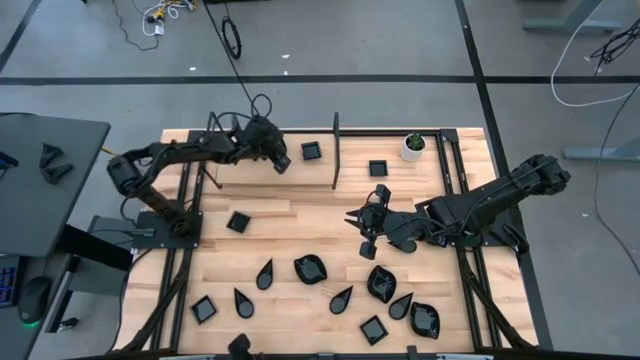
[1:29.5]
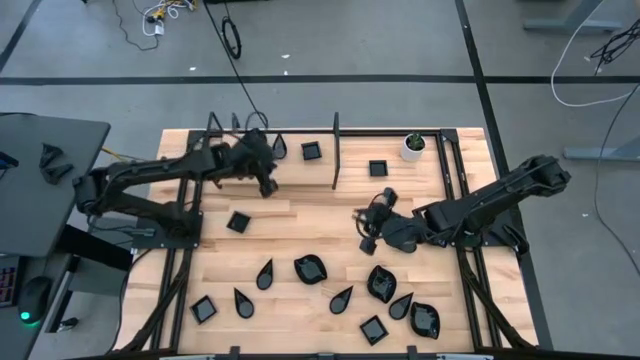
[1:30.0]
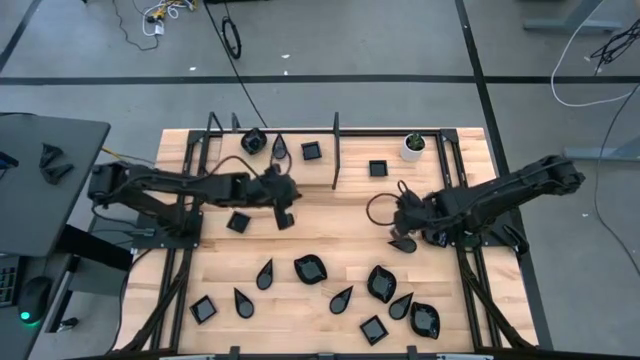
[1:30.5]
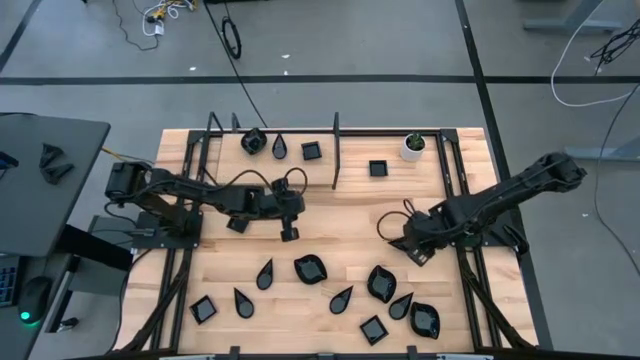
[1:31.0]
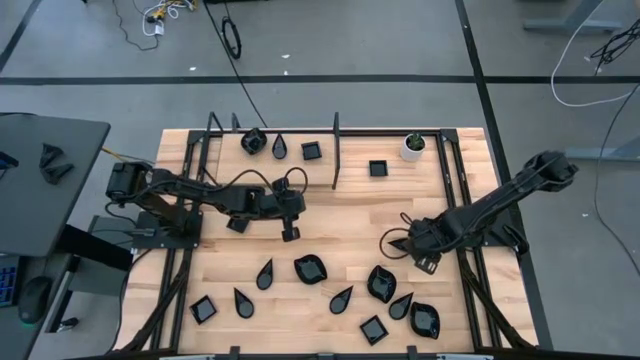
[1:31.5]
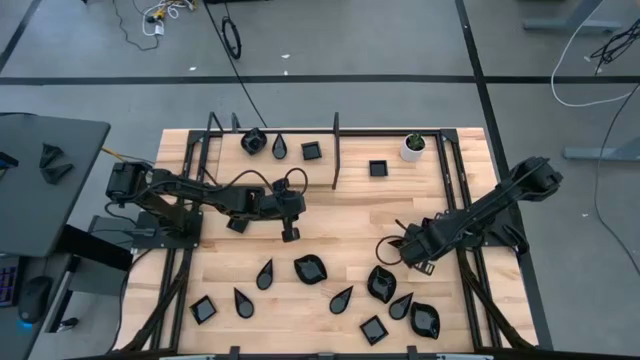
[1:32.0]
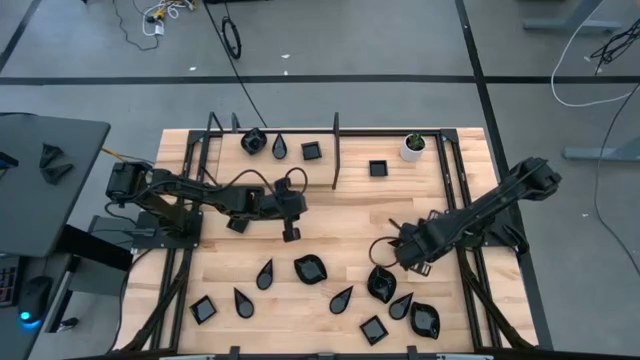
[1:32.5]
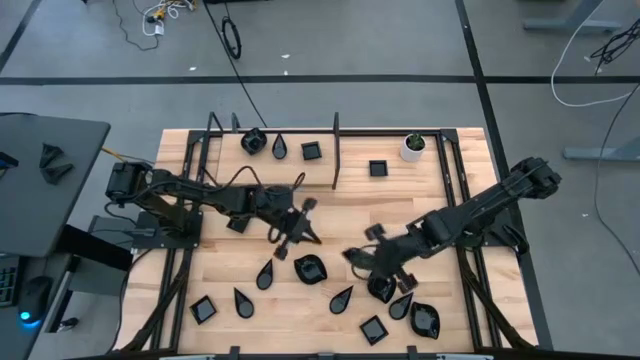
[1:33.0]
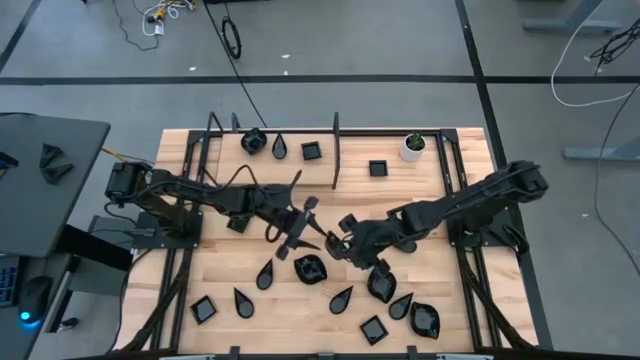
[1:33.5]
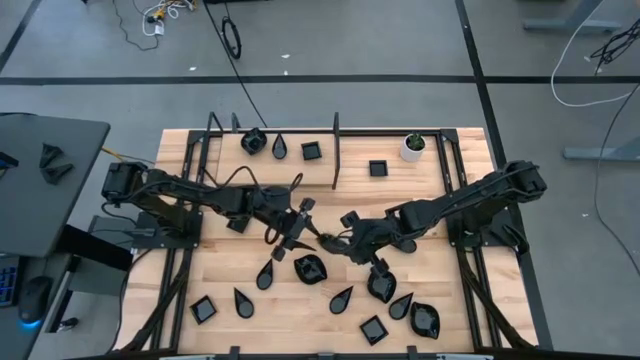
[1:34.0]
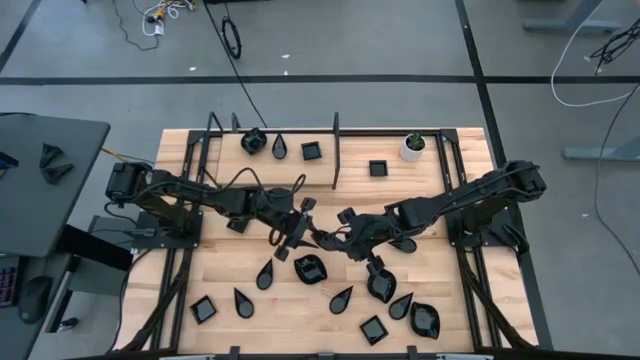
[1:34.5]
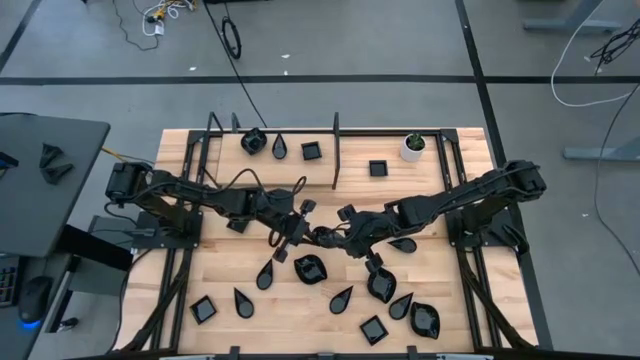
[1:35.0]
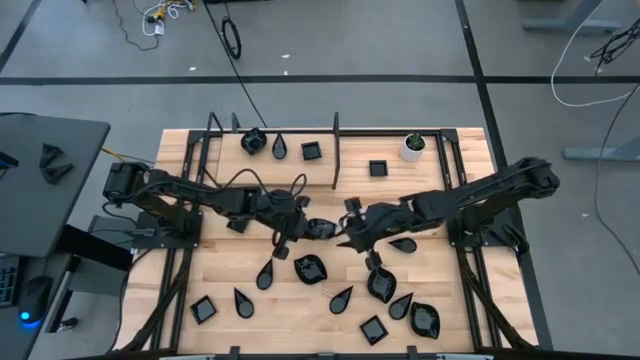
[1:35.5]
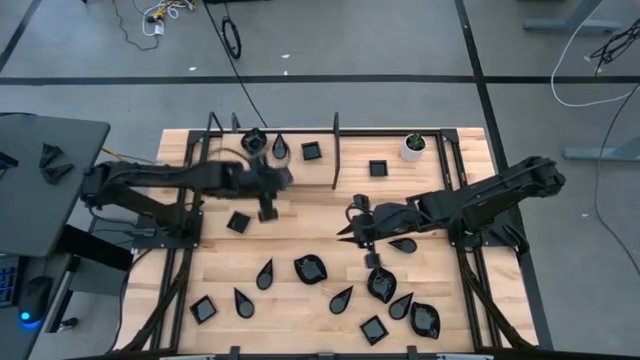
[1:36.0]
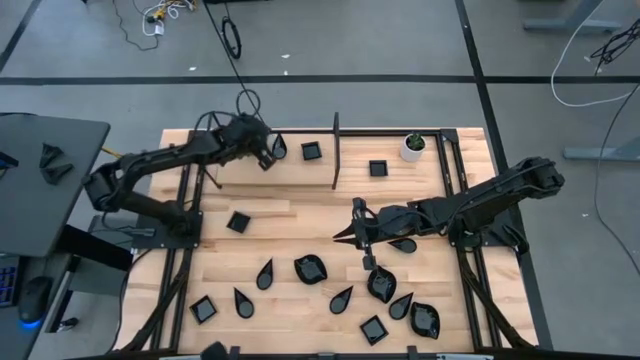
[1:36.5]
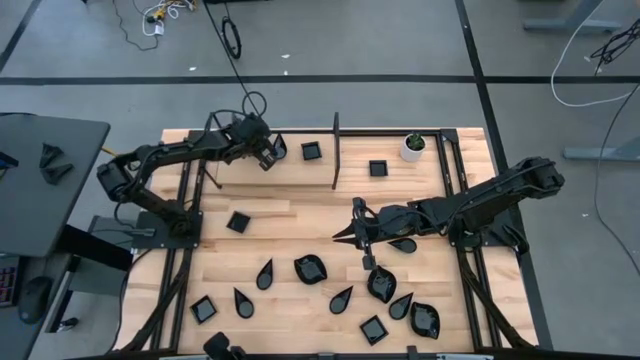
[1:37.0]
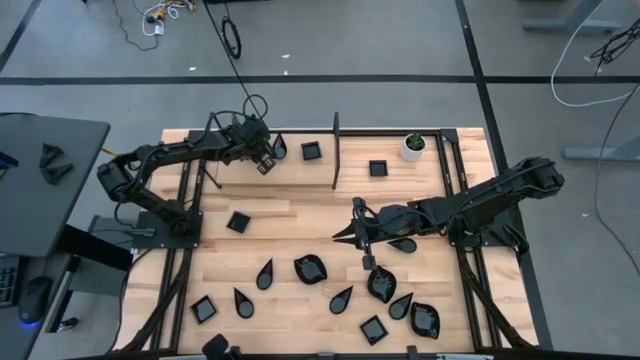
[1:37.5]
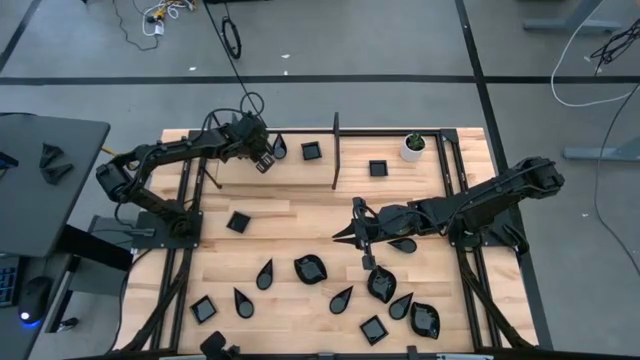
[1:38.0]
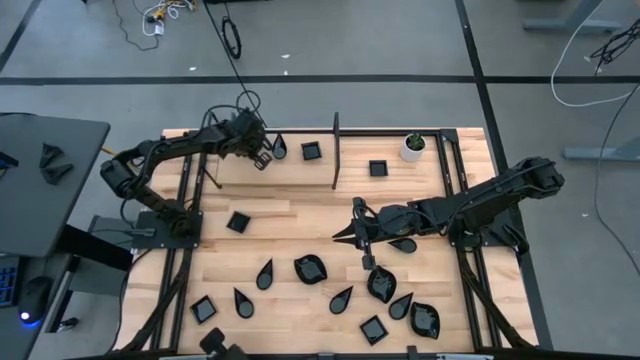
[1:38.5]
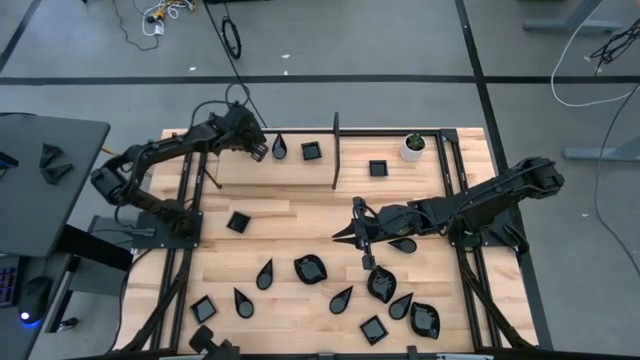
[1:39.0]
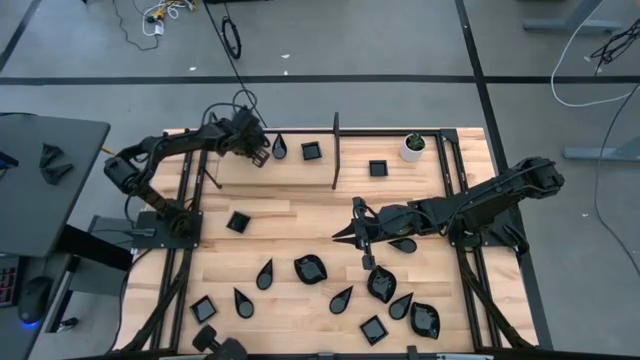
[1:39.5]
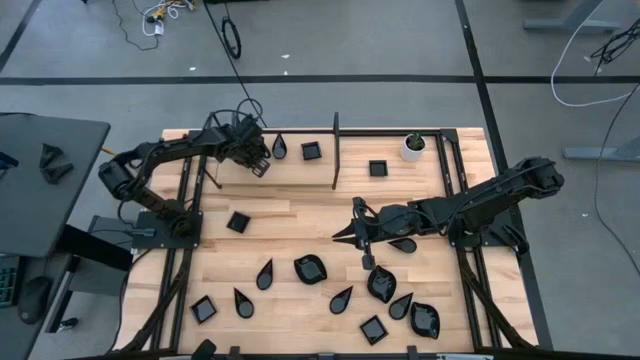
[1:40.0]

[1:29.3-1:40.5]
Task: Pick & Place Mini shaped plates
Stack the black leaf-shaped plate on top of the stacked black leaf-shaped plates on the shelf

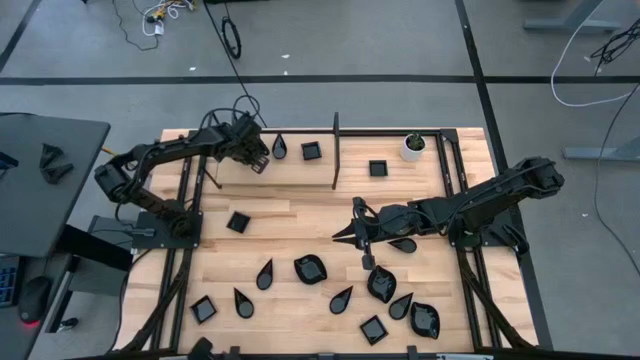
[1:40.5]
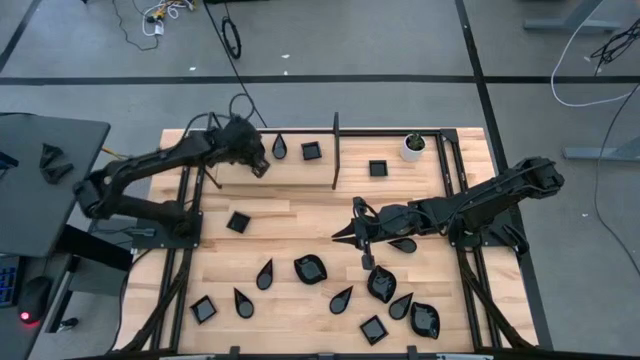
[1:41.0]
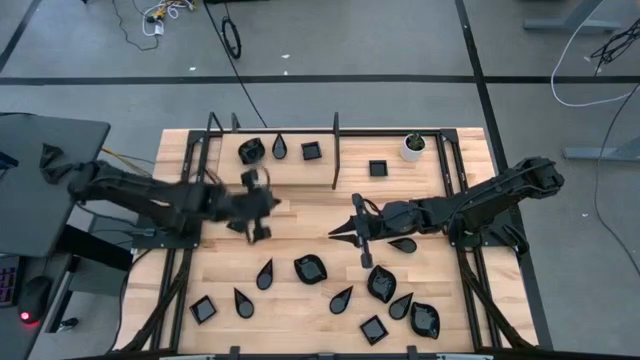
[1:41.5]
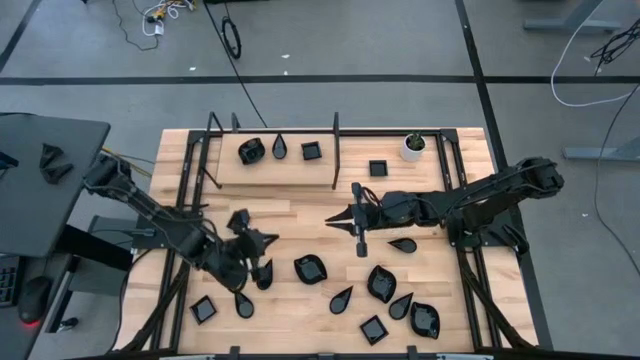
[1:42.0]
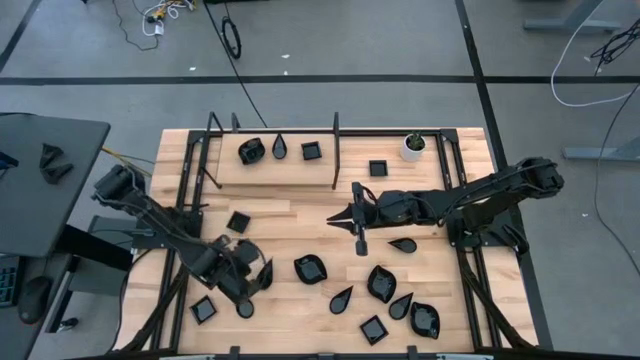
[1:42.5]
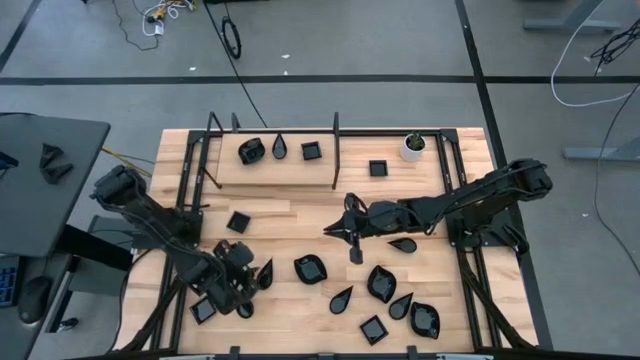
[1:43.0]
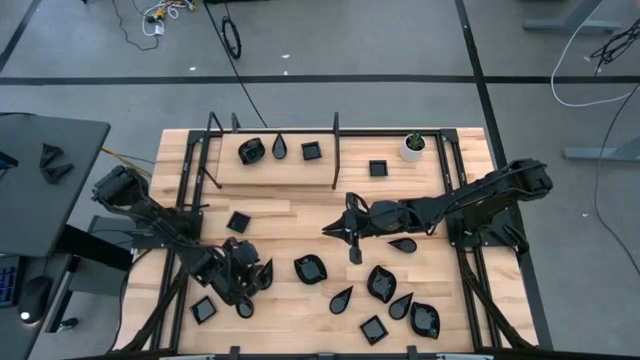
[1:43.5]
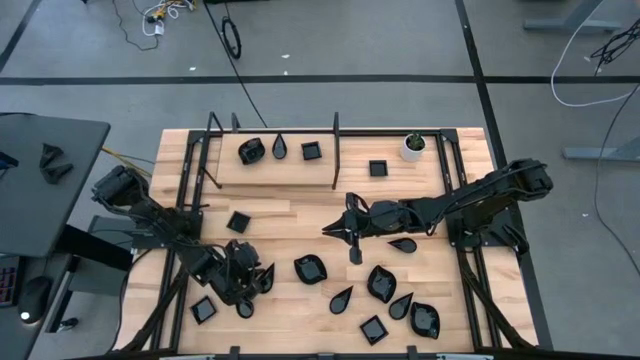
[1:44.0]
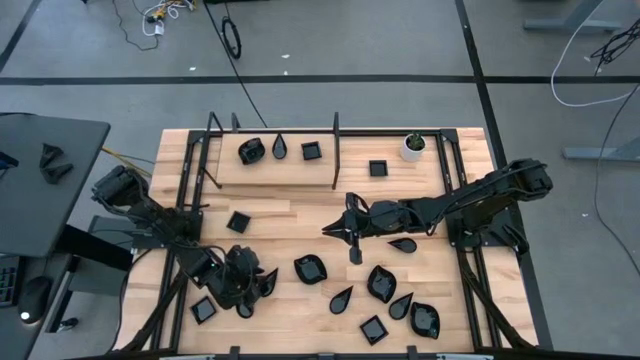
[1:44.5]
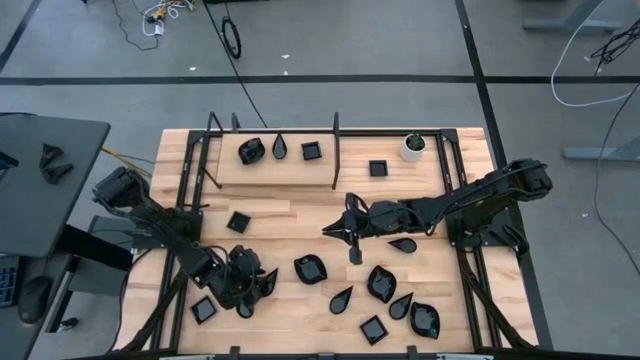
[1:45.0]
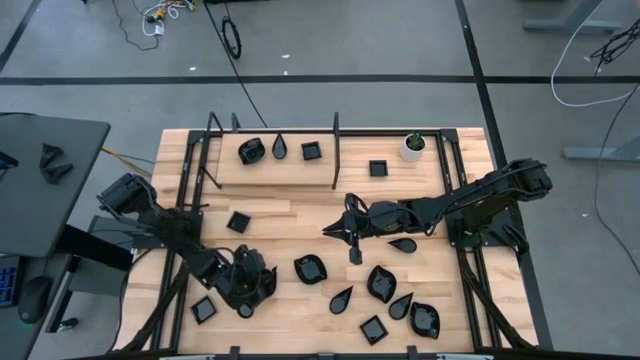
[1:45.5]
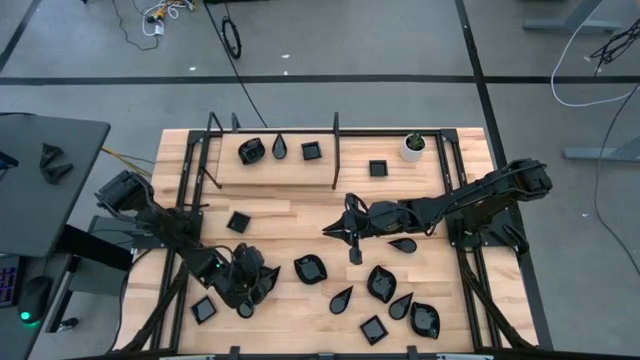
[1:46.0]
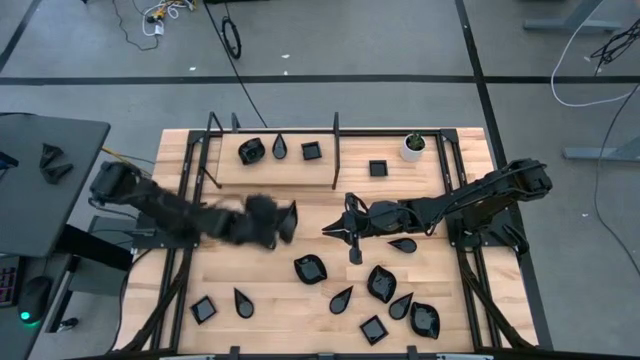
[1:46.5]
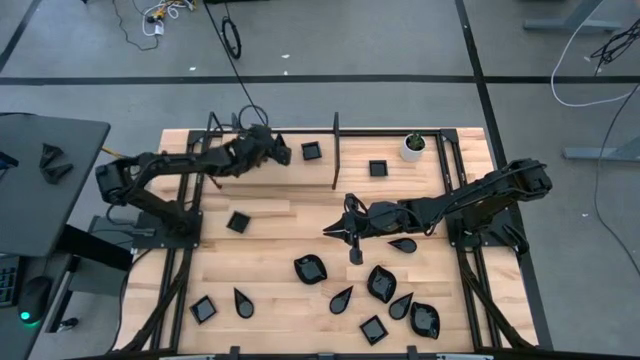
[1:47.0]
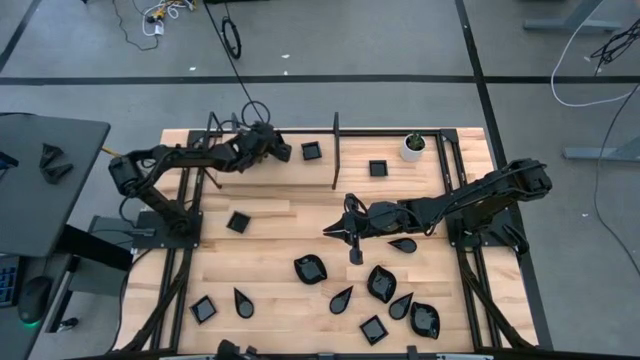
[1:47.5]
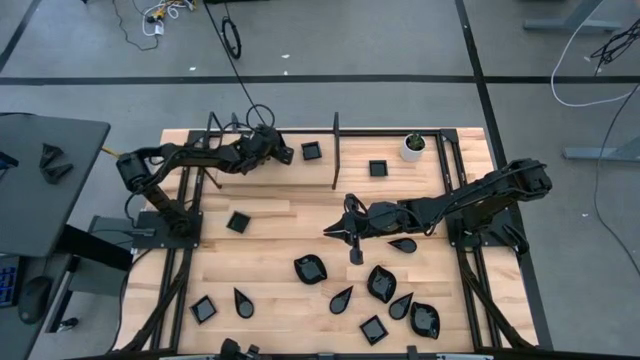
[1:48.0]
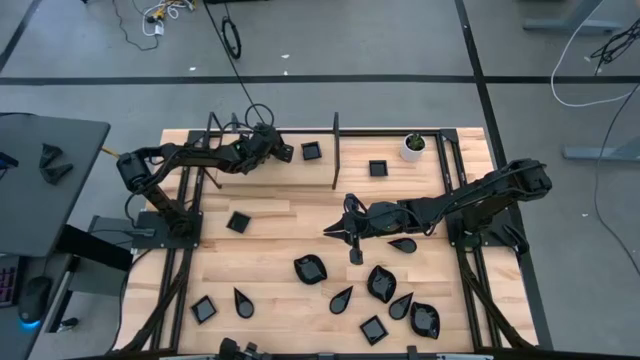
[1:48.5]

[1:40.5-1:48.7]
Stack the black drop-shaped plate on top of the stacked black drop-shaped plates on the shelf

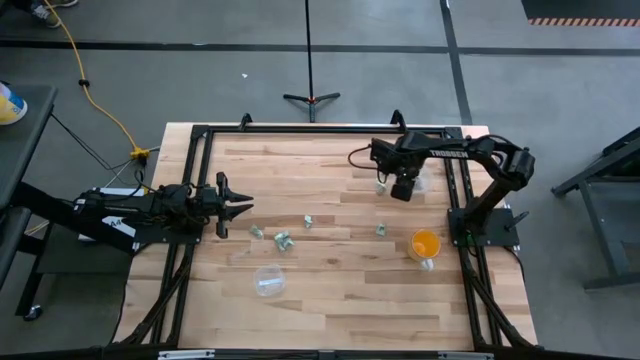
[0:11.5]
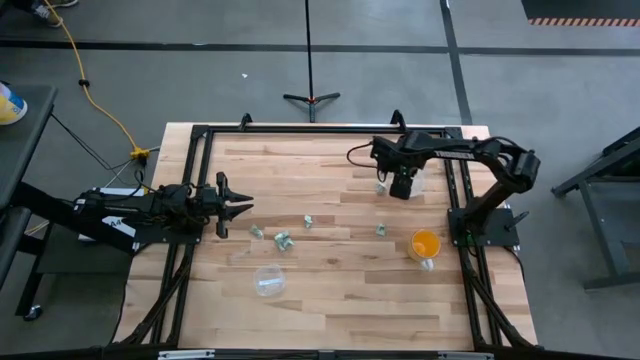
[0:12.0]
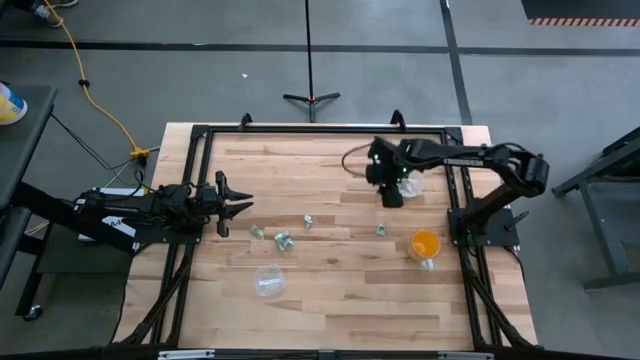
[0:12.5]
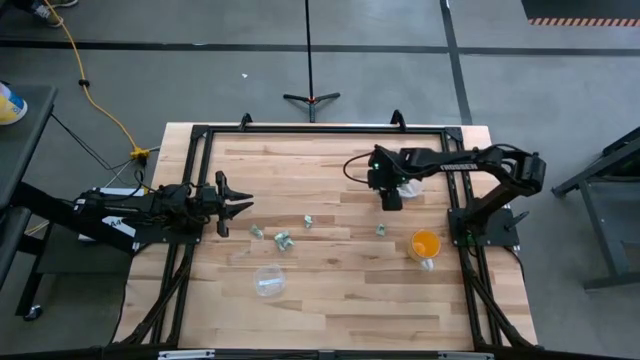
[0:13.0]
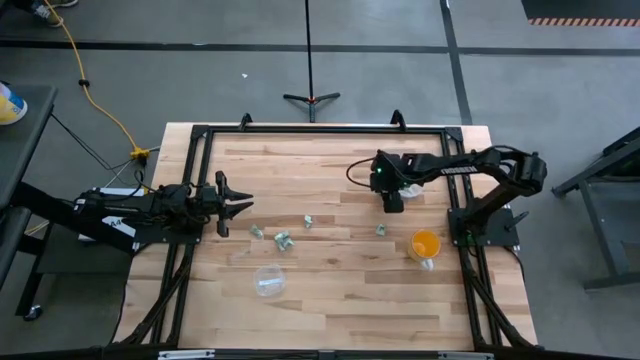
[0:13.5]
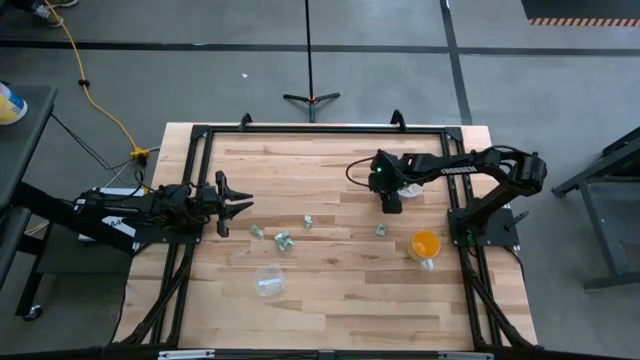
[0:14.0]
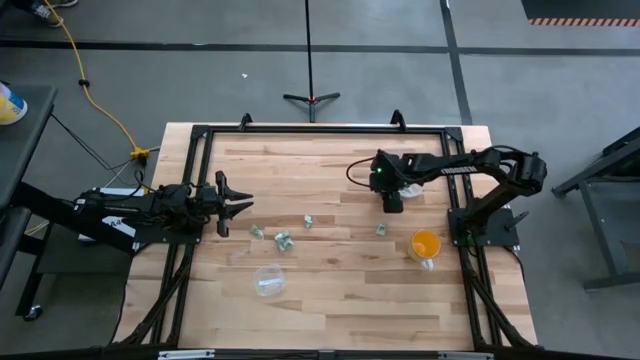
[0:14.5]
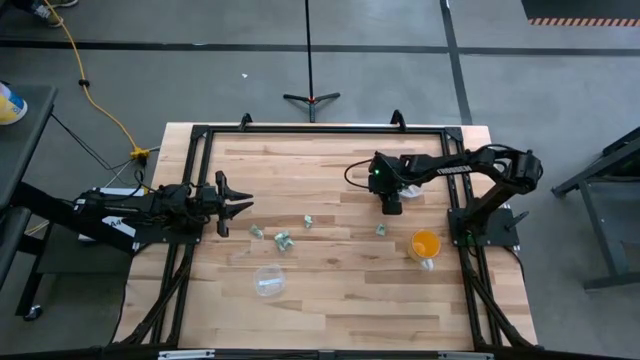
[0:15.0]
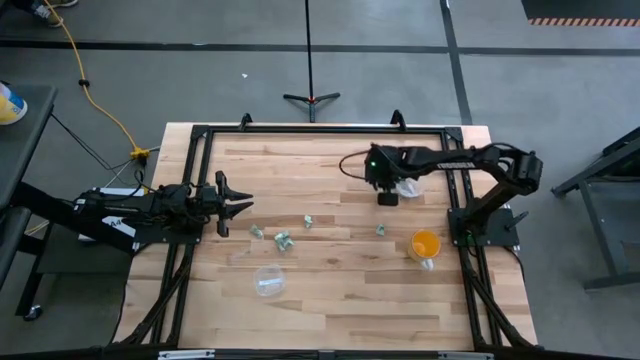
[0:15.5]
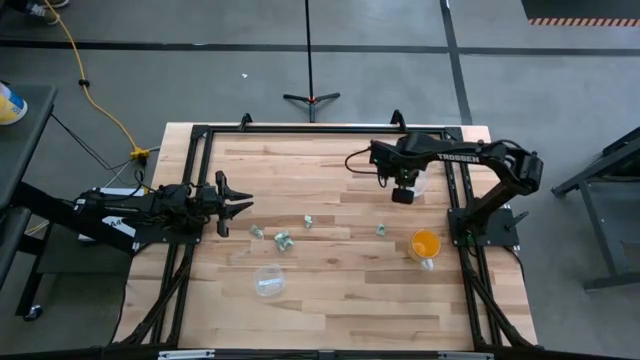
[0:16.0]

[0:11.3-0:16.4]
Task: Pick and place Stevia / Truvia into bins
Put the stevia packet into the circular container
